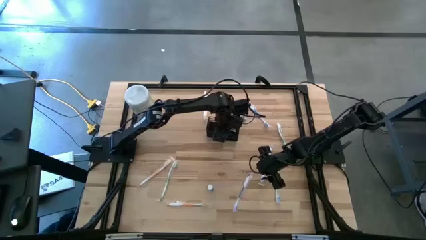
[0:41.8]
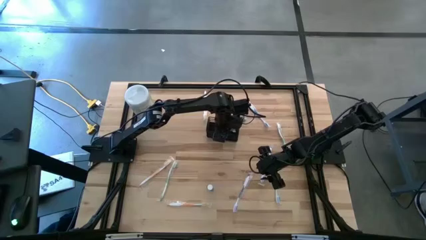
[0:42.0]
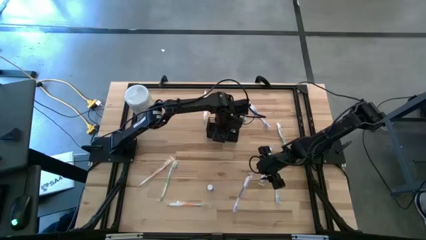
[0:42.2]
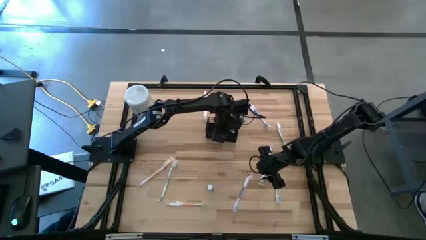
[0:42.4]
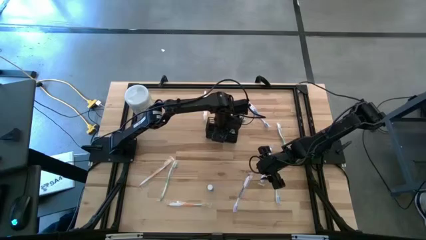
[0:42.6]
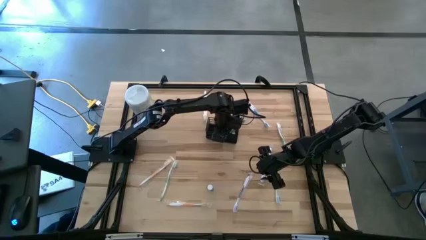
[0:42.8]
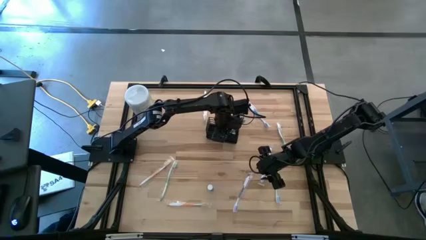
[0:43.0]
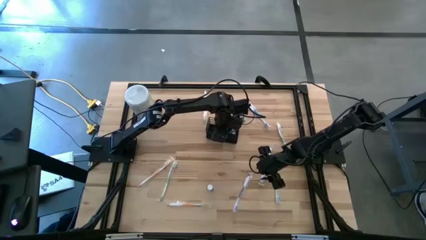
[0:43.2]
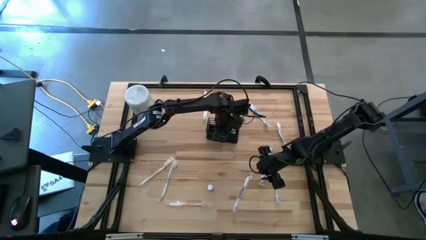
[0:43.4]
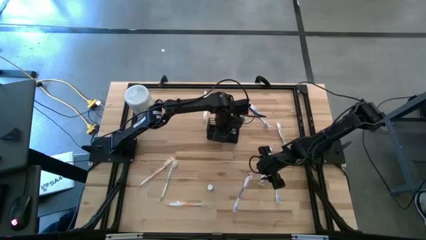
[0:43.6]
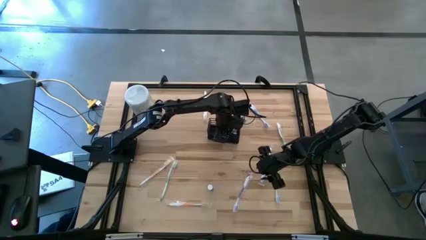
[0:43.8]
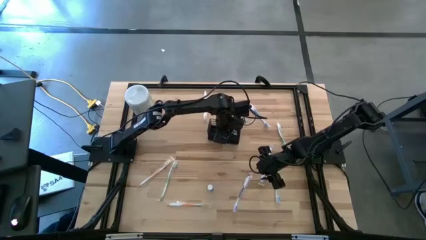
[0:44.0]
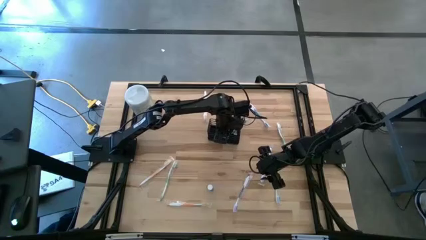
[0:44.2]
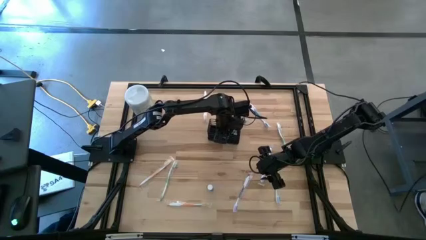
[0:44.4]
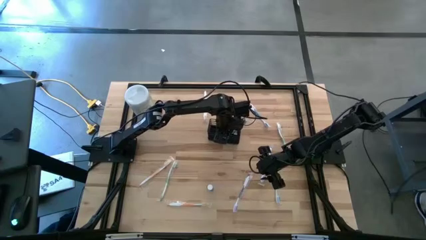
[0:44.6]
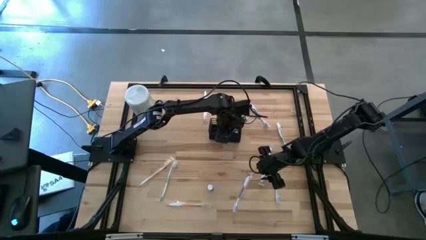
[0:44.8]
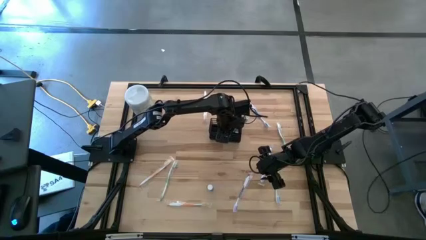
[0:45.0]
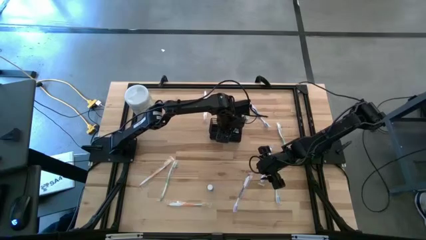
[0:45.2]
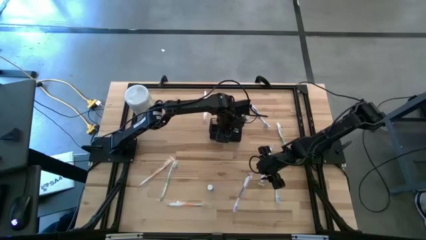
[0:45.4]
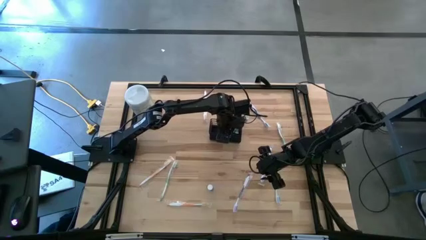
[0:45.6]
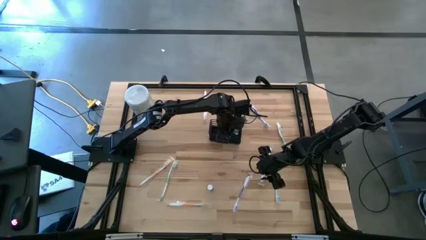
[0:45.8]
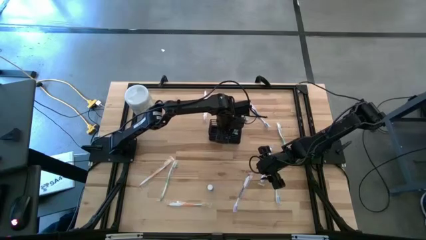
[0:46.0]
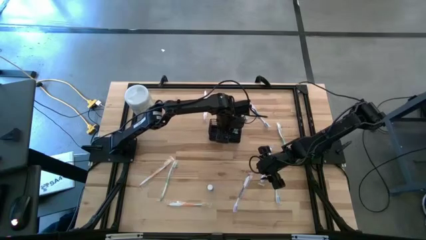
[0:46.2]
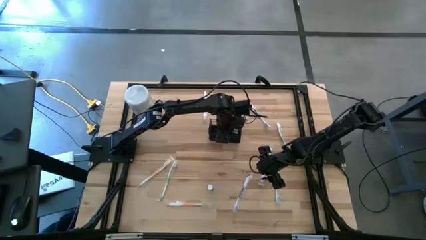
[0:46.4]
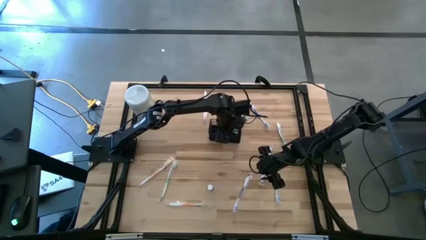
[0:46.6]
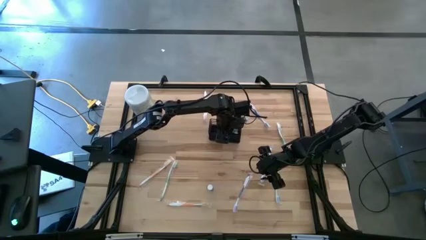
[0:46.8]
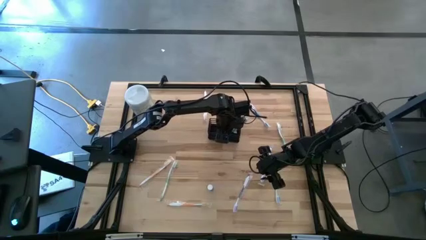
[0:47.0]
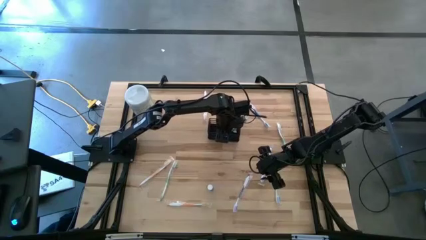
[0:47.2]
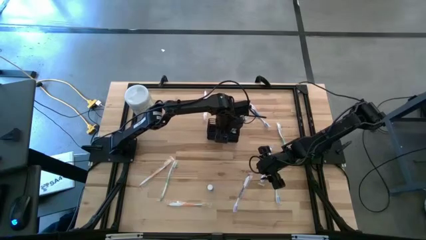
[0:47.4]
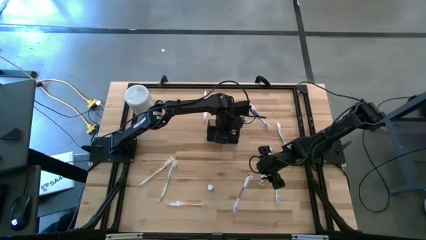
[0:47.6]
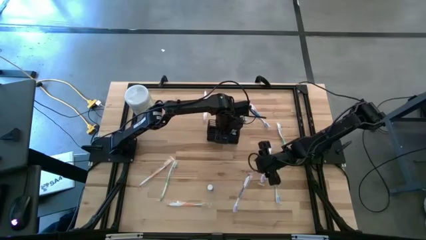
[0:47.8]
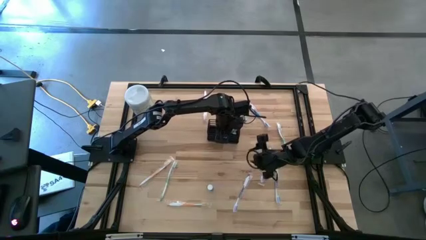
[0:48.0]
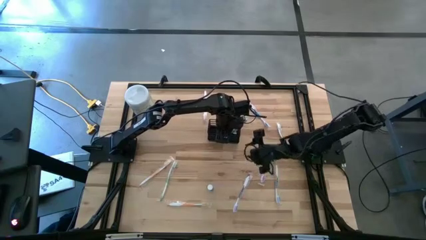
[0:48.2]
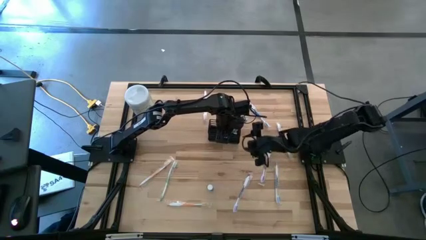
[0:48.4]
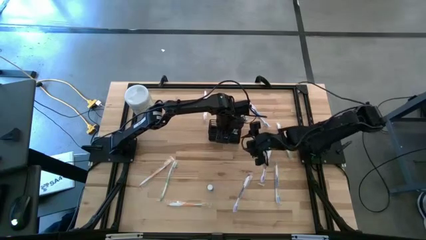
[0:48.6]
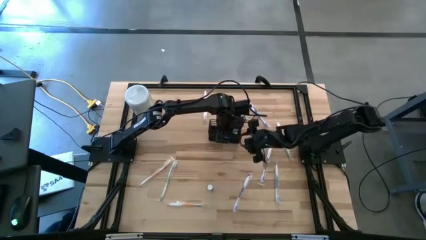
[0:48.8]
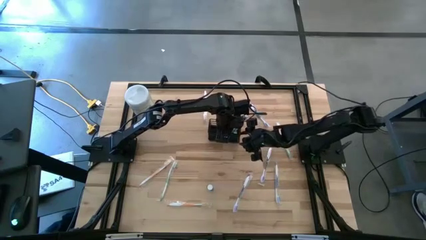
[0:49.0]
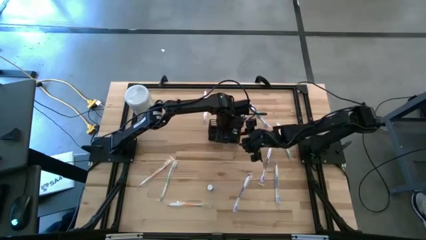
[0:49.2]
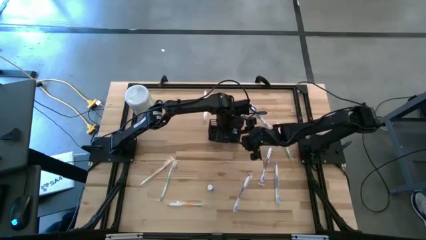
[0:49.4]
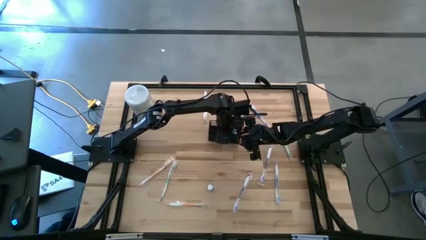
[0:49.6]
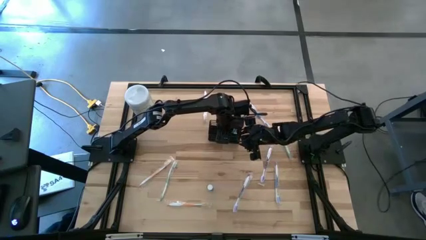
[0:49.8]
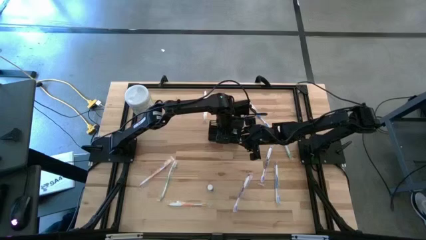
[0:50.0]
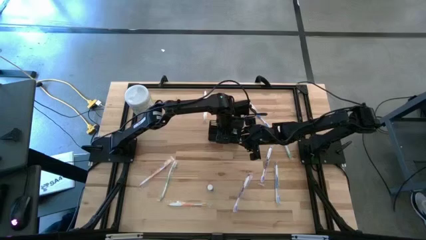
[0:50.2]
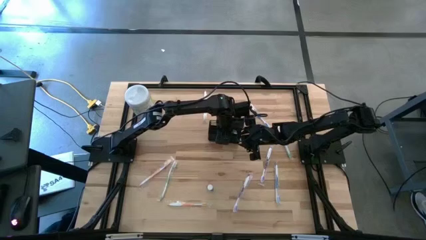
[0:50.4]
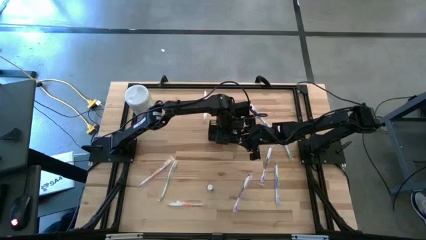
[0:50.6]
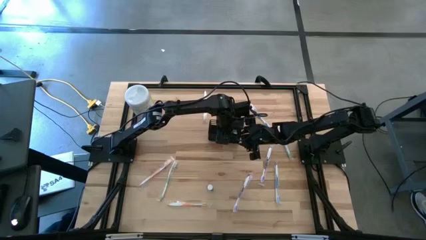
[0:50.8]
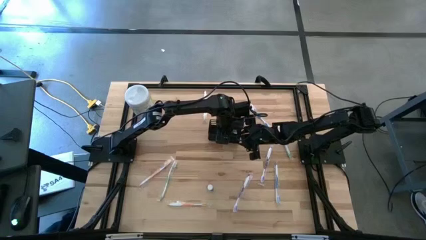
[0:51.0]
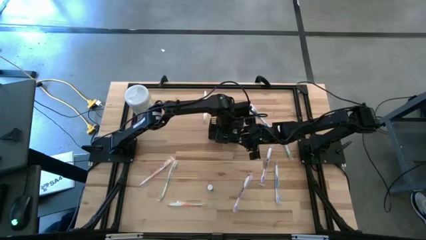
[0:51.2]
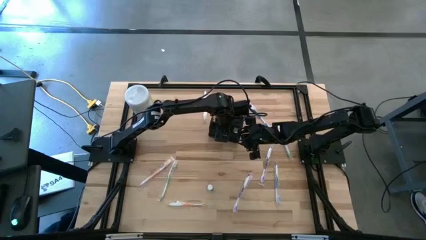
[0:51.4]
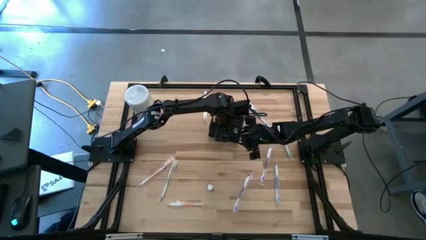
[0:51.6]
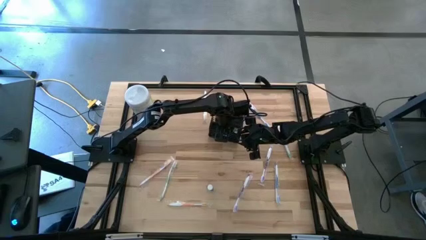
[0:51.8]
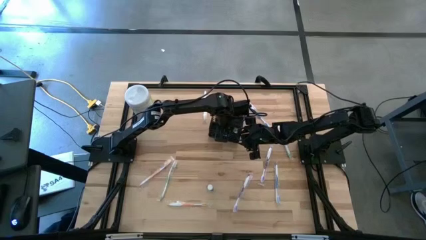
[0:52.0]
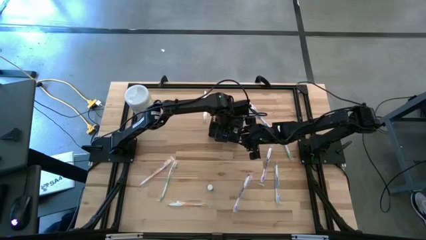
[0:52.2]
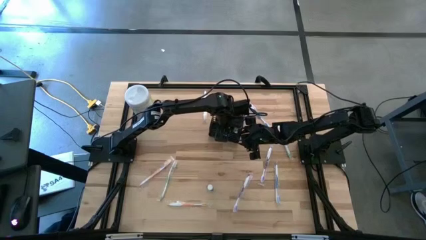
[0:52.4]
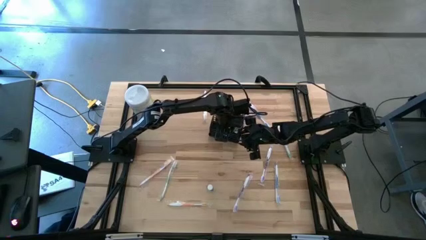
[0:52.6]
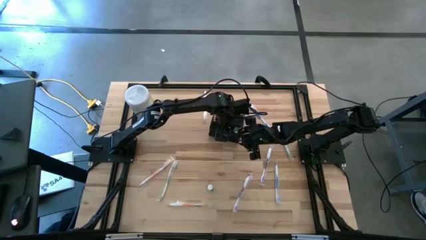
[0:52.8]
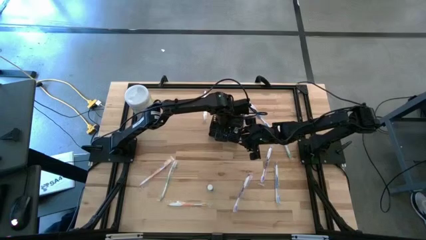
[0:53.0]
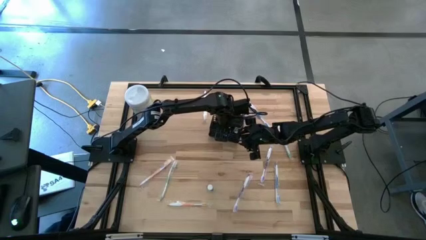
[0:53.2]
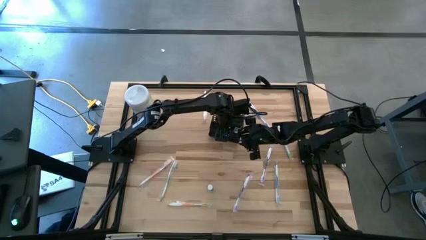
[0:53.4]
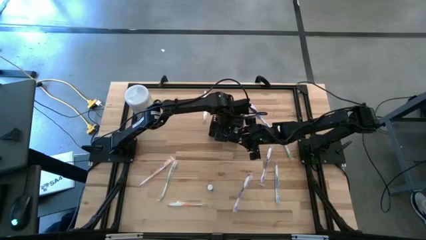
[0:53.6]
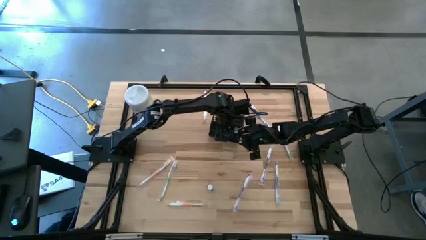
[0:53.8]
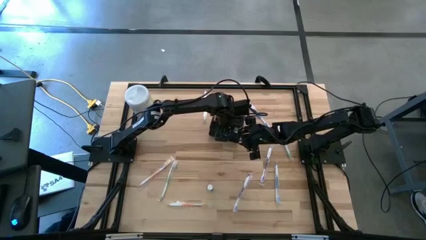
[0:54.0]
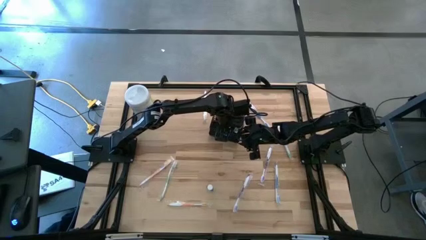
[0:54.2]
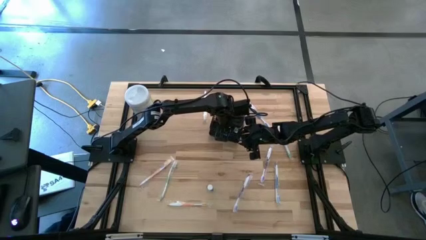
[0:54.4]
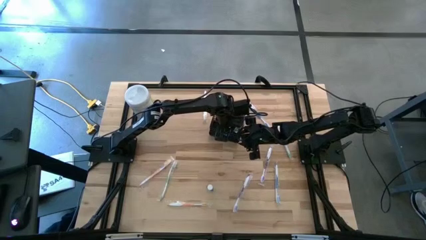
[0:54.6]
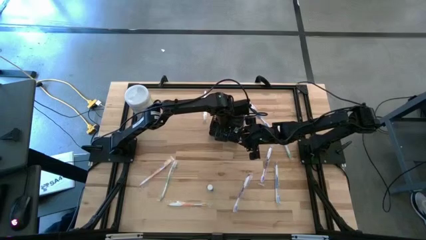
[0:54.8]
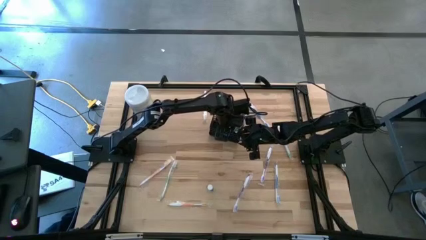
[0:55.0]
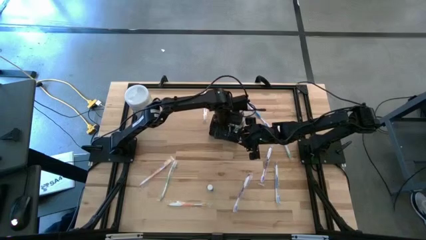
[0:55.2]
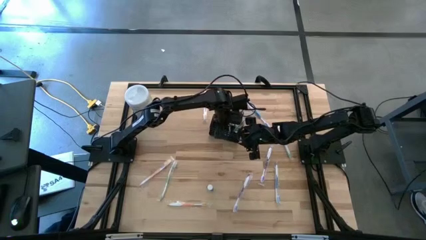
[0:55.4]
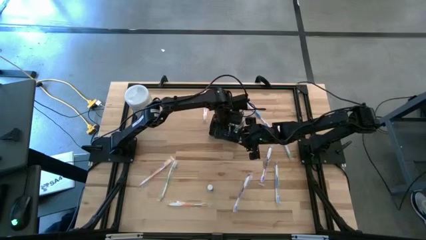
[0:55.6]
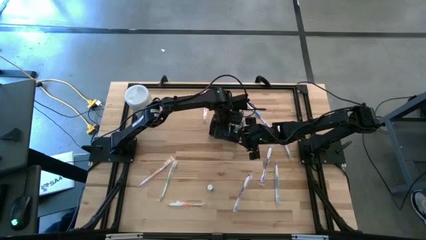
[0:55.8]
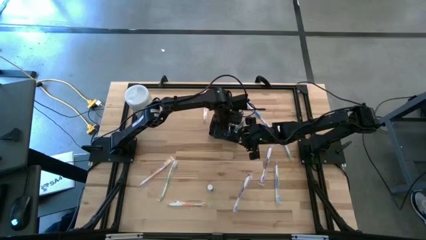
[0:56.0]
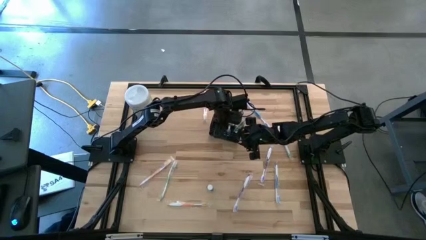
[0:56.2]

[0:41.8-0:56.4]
Task: Pick & Place toothbrushing station
Put the top mouthwash into the mesh organizer
